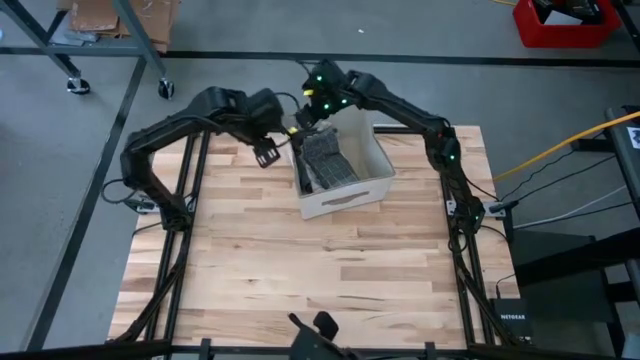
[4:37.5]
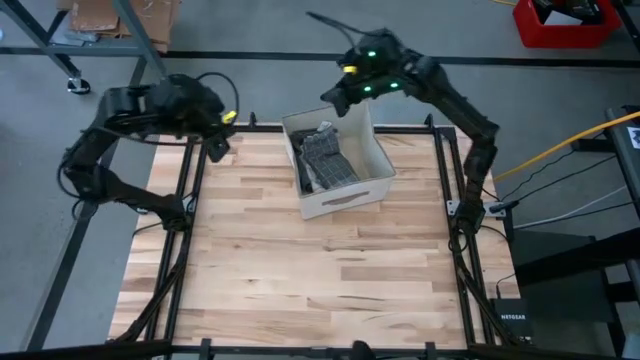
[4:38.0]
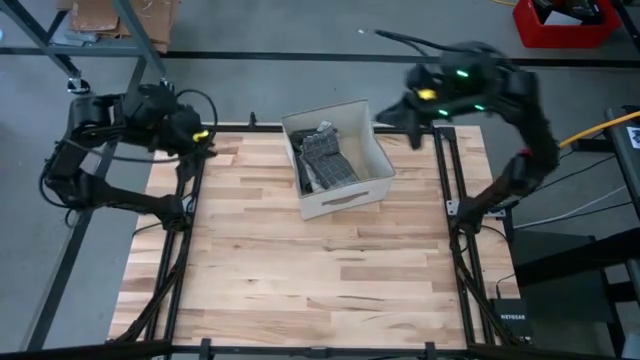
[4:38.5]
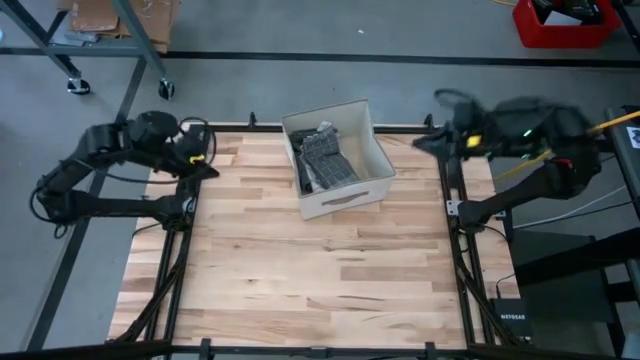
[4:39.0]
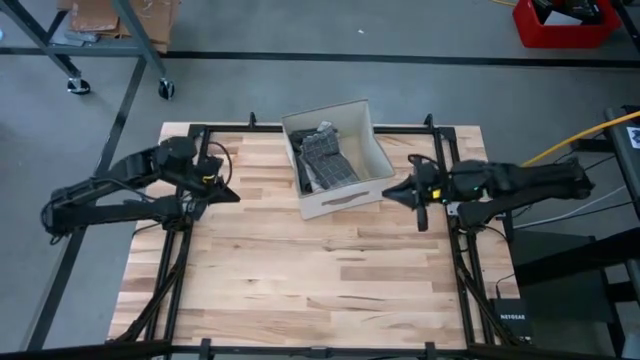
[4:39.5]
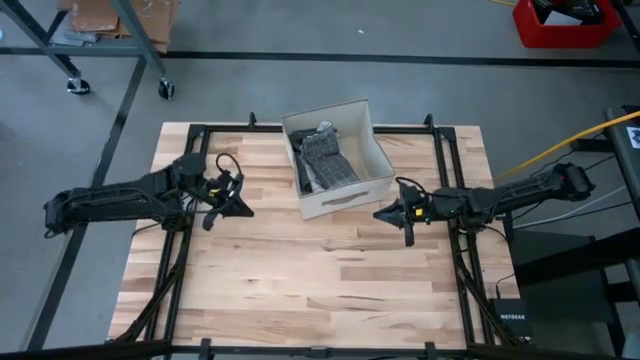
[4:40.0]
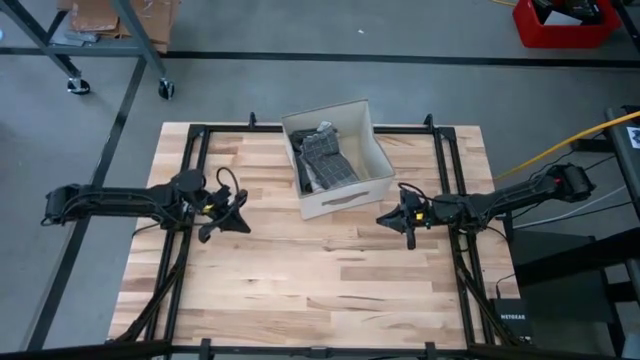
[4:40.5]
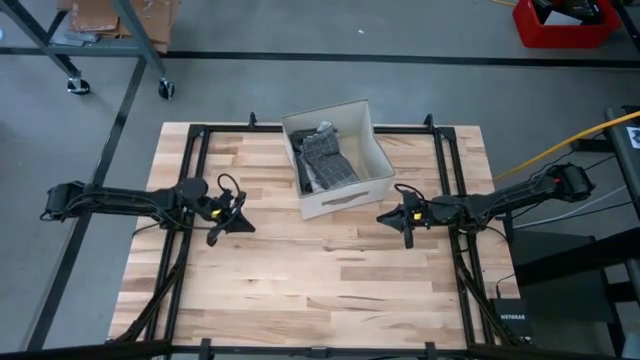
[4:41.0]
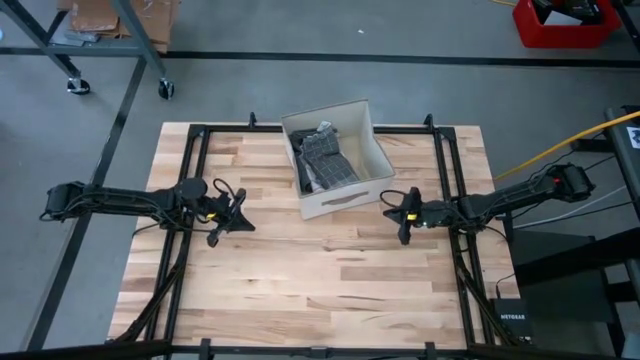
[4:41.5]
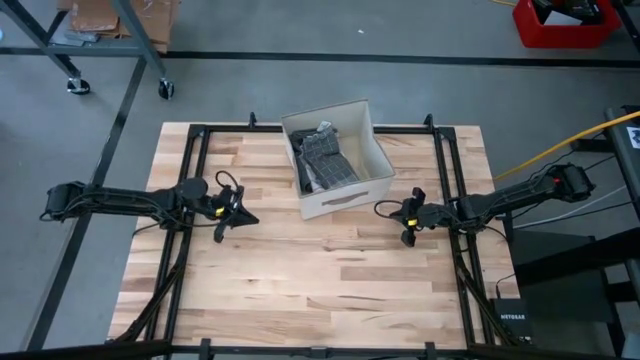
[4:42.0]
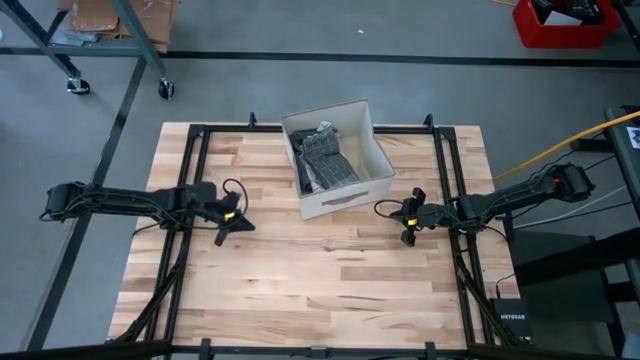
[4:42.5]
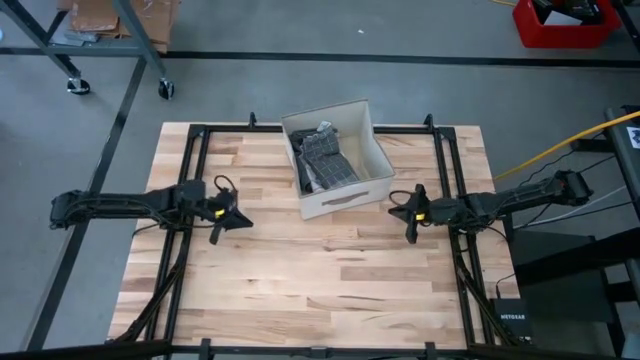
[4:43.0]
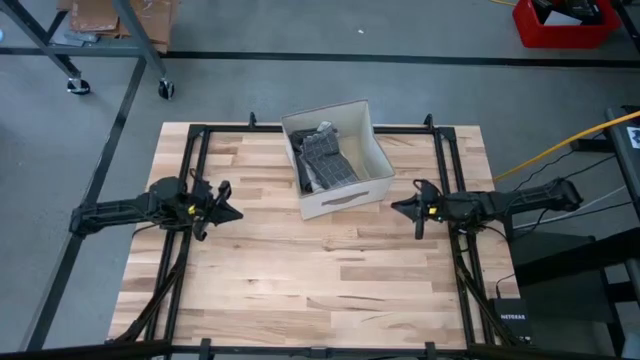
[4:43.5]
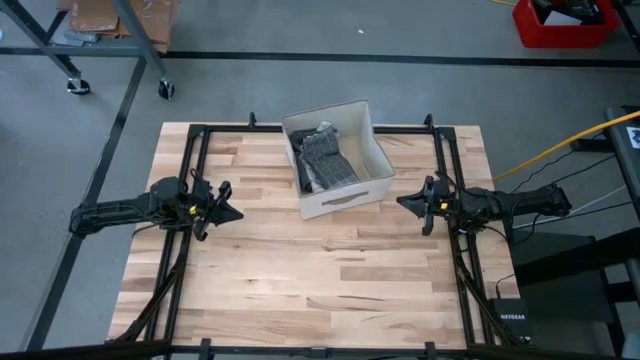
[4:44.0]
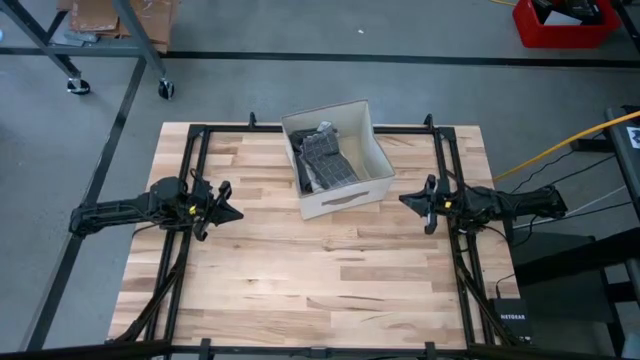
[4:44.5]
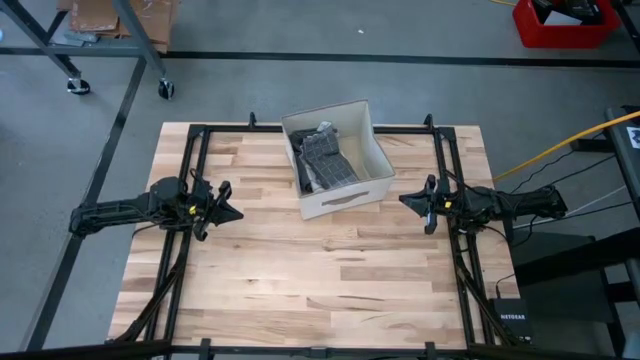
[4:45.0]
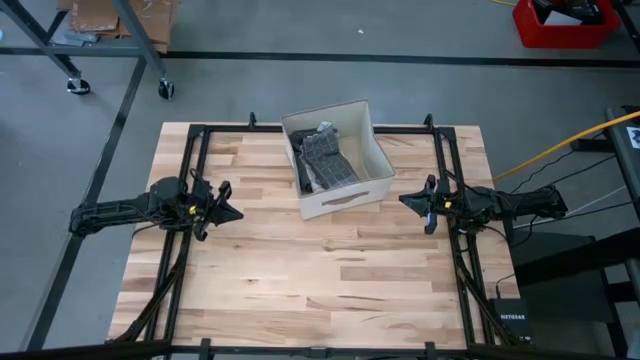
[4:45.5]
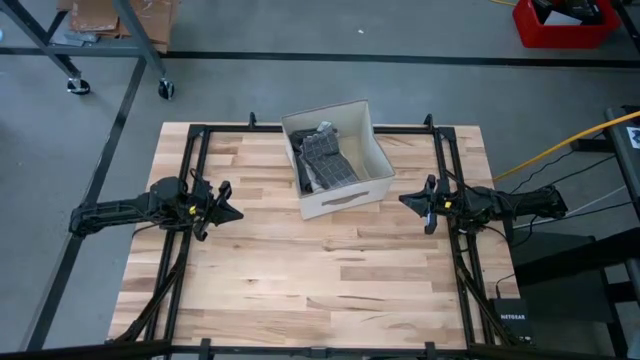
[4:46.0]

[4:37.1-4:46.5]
Task: Fold towel
Return to Home Position

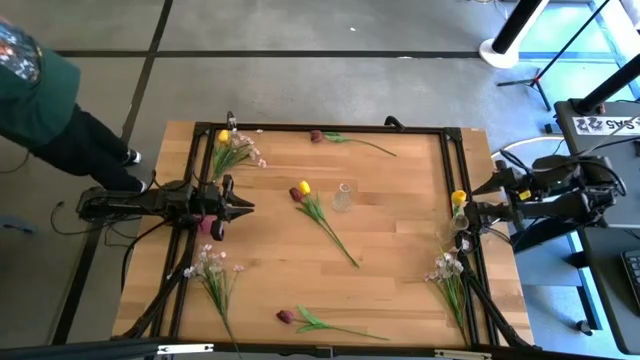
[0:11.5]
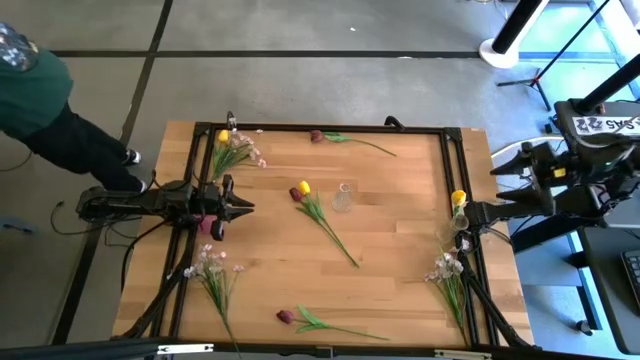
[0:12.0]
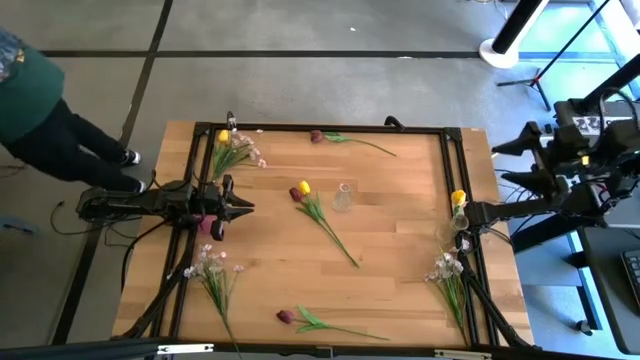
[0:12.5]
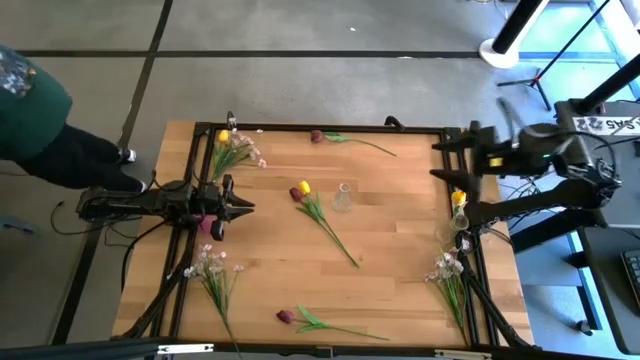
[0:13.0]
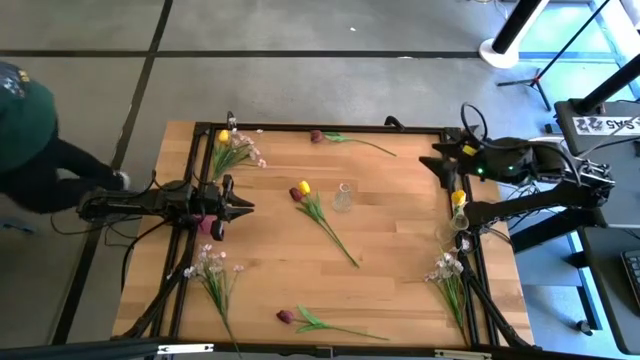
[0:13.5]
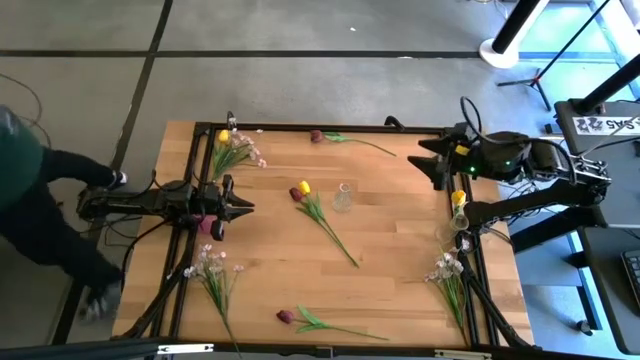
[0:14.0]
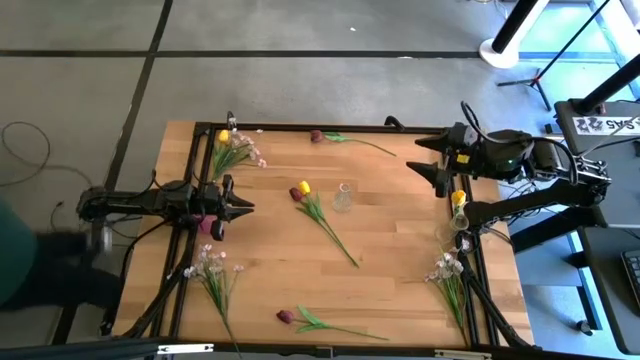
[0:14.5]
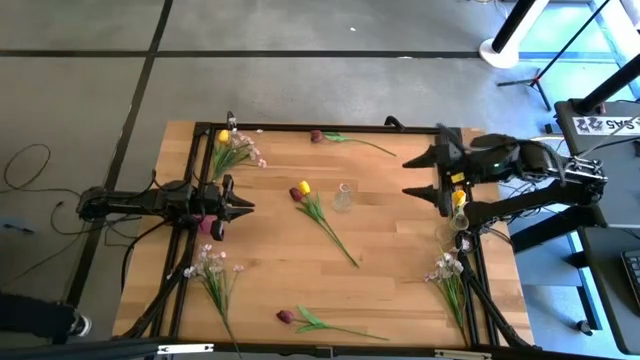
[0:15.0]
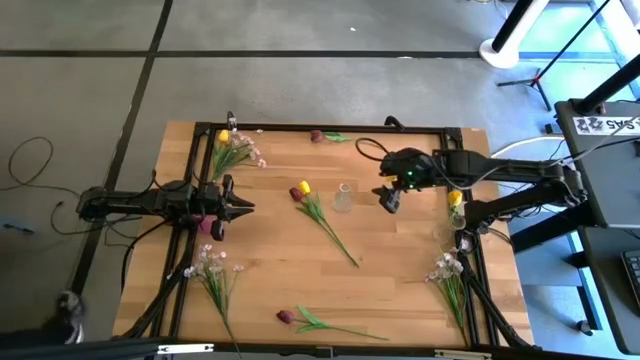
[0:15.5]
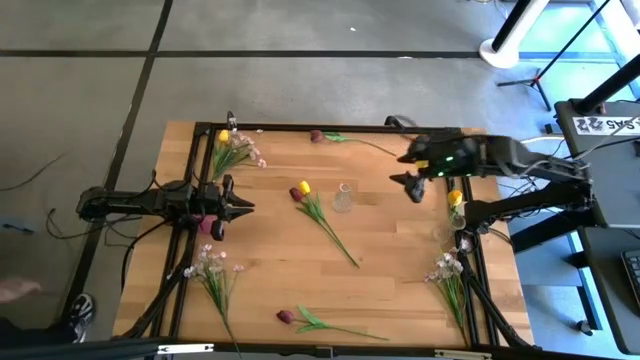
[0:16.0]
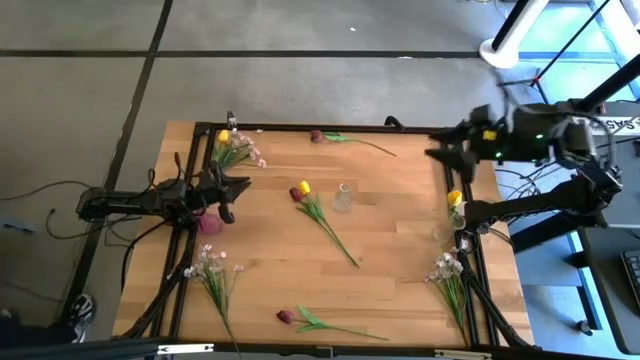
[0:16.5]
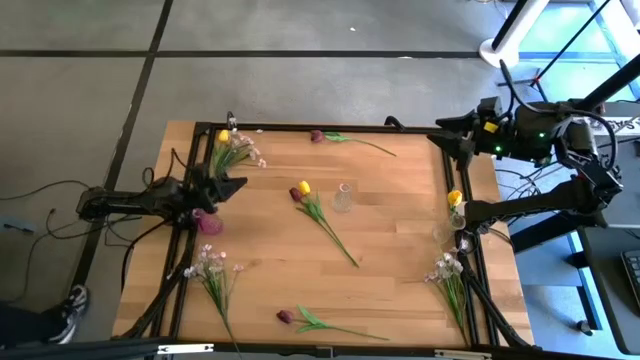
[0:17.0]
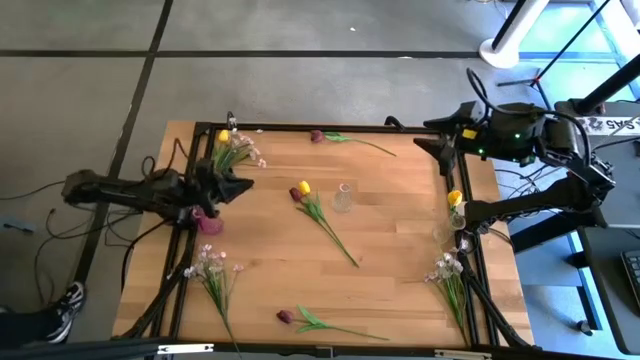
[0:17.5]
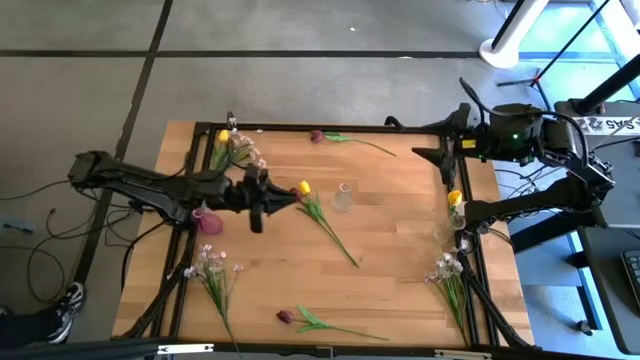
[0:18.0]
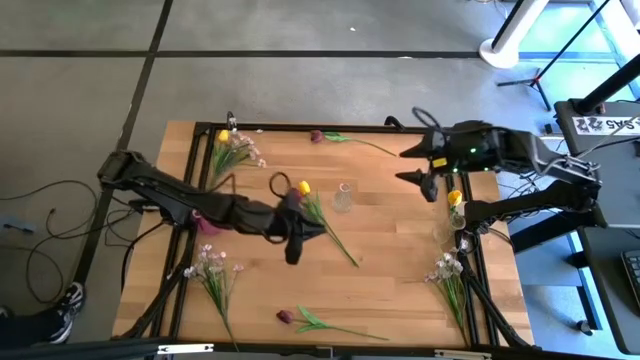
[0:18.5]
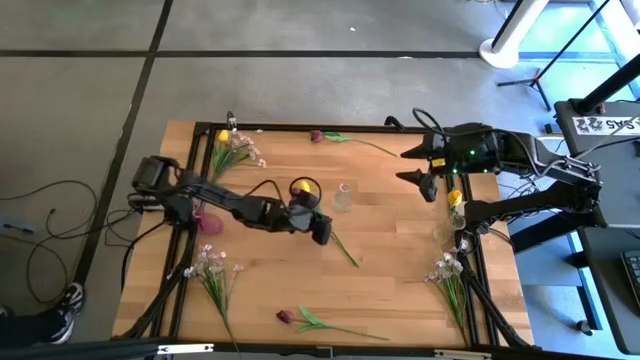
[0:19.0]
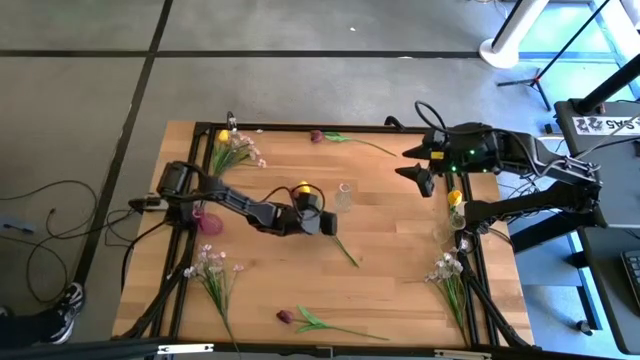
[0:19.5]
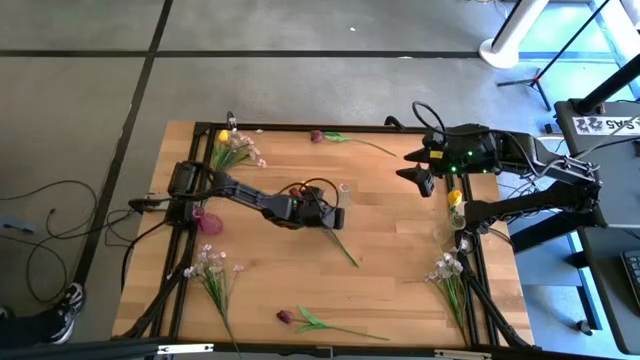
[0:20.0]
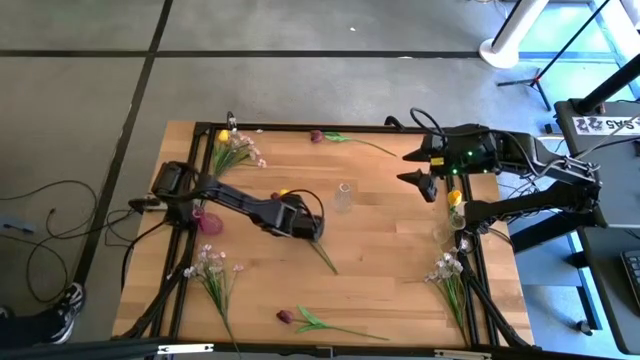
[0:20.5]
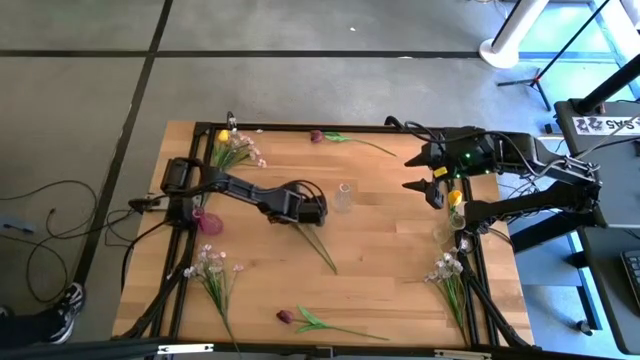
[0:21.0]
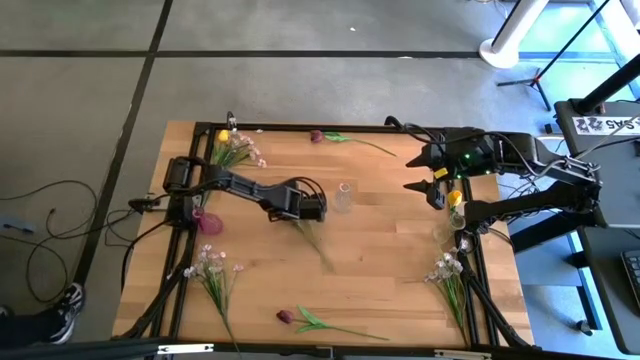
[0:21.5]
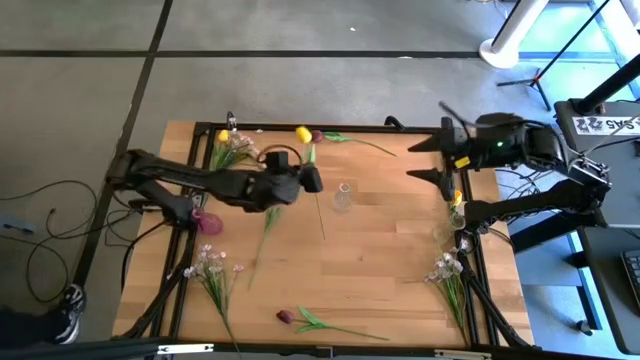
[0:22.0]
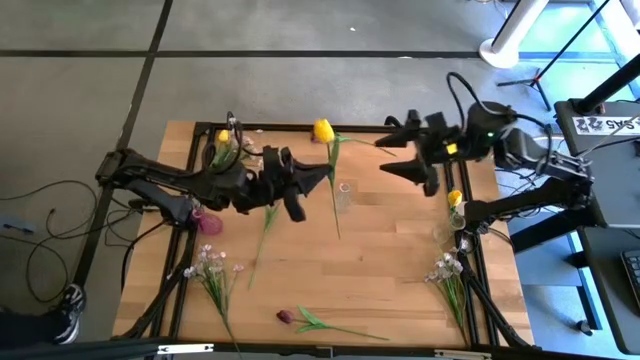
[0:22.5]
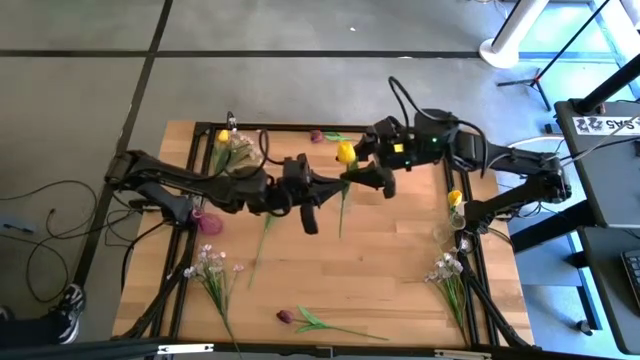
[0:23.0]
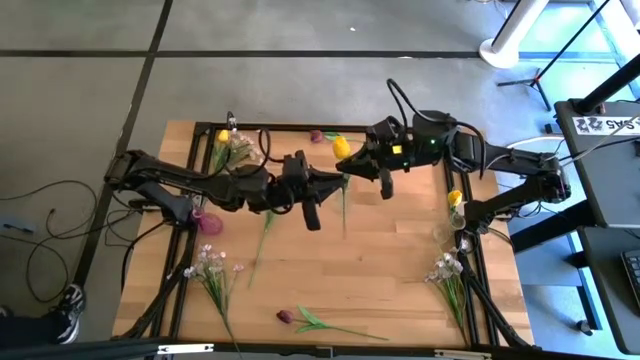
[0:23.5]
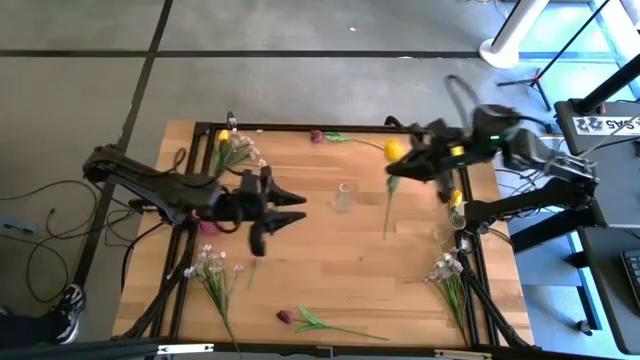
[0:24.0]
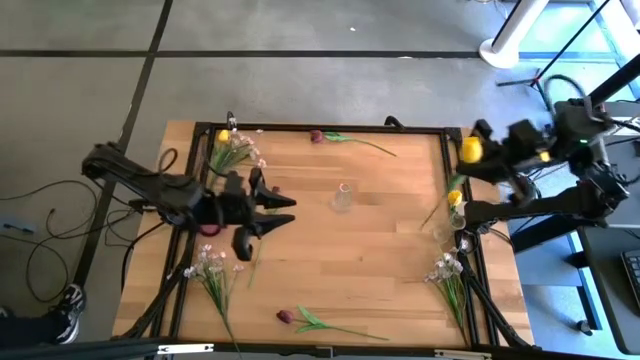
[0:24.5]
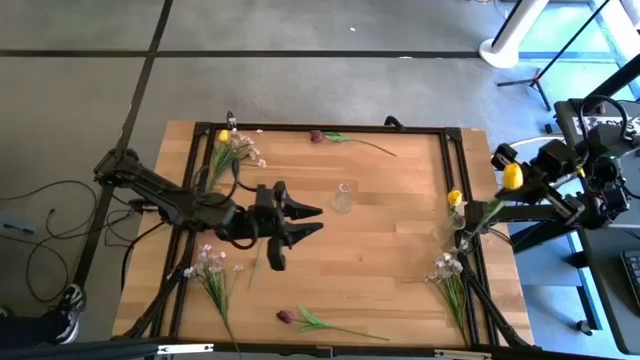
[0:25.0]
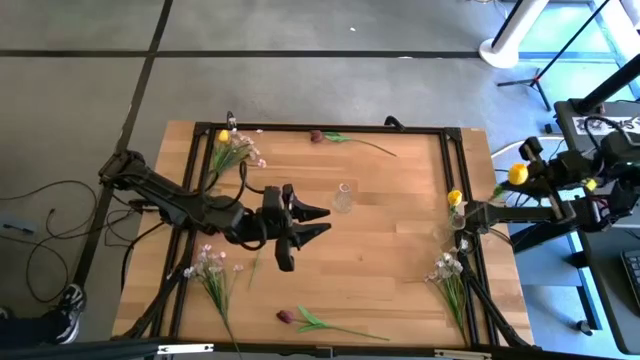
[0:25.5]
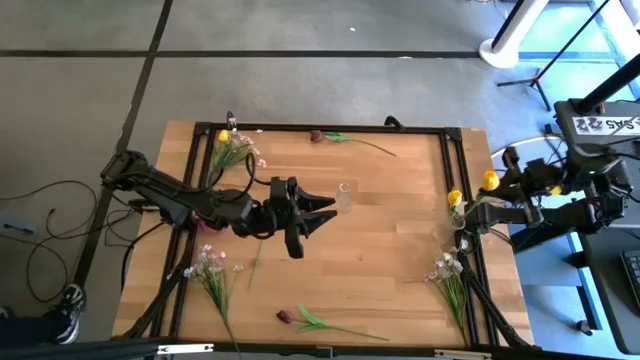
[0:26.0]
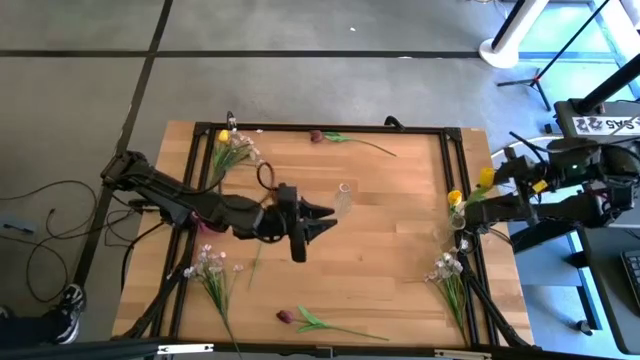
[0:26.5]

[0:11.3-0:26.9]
Task: Sort flowers into vase by color
Put the bottom yellow tulip into the bottom transparent vase
